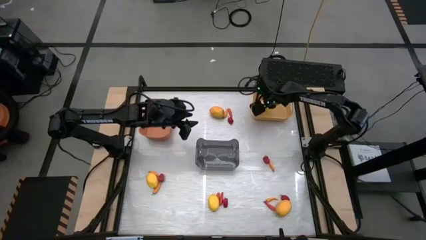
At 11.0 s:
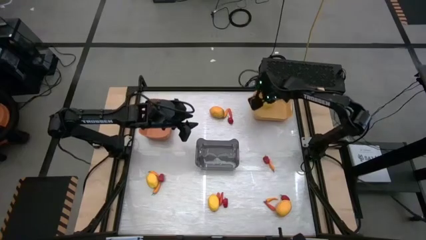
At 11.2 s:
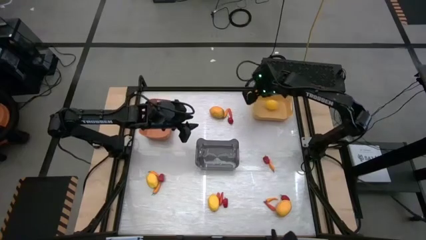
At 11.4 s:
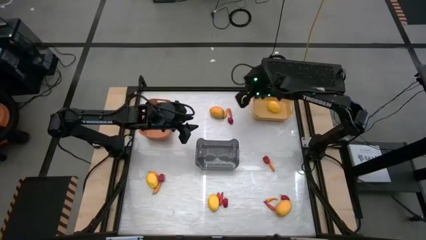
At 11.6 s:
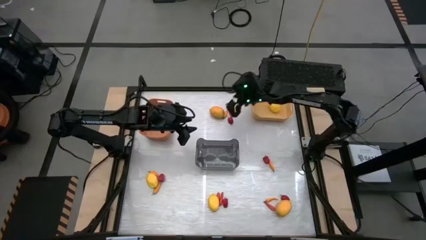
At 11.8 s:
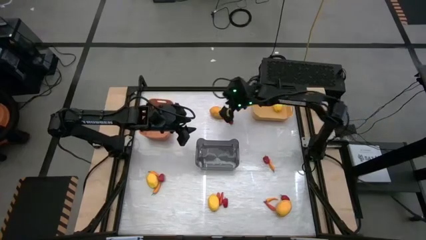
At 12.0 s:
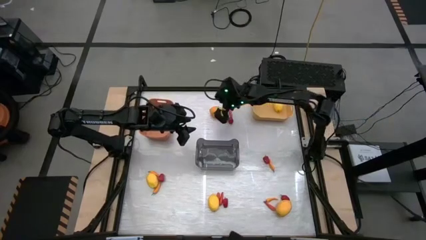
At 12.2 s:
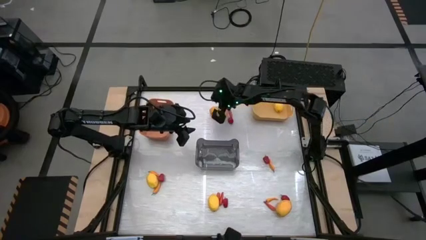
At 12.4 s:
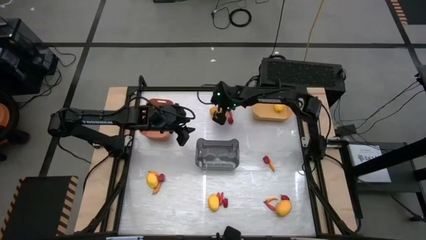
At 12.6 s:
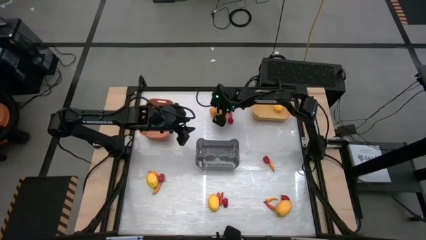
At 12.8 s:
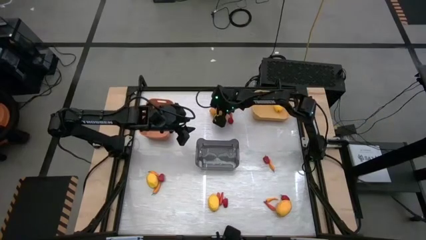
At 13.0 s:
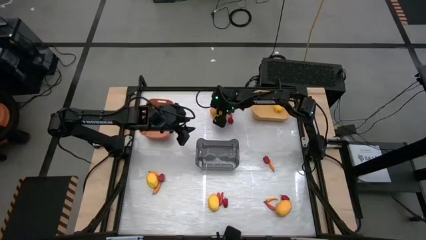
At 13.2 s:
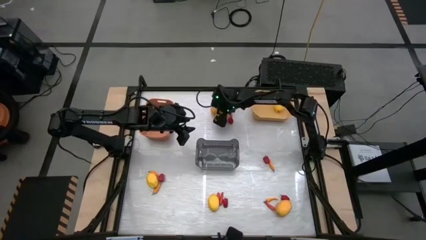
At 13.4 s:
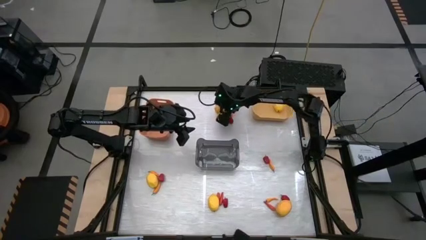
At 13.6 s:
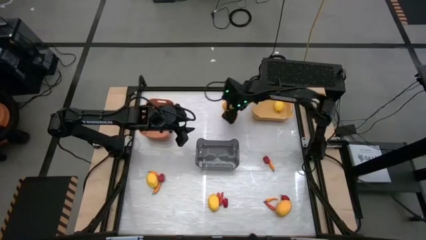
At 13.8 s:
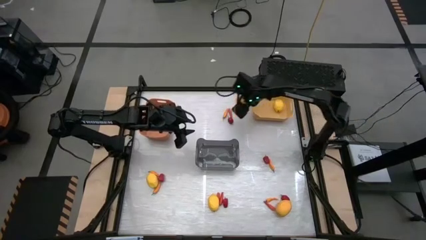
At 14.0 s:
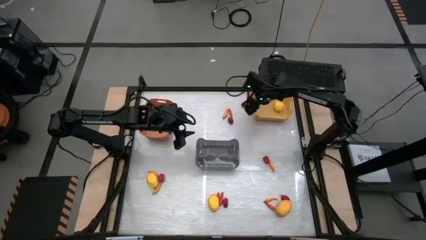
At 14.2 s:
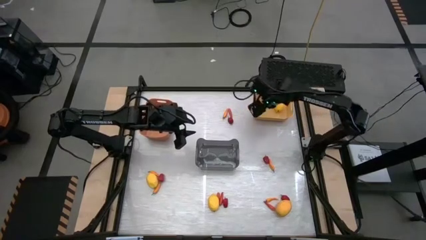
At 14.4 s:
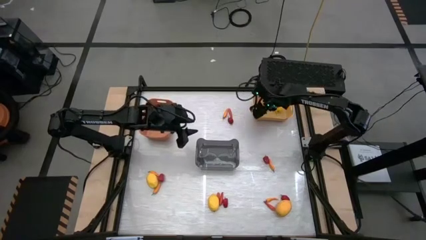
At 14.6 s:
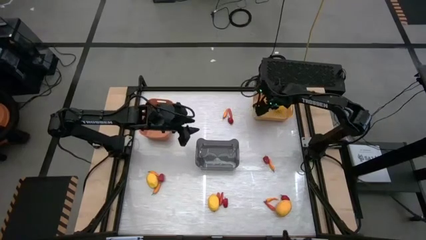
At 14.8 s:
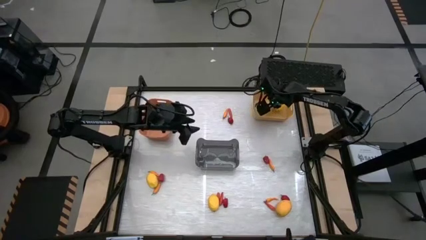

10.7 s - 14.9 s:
Task: Sort produce into baskets
Put the yellow lemon into the yellow bin

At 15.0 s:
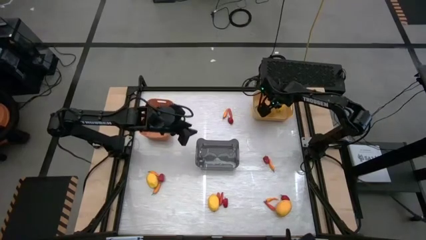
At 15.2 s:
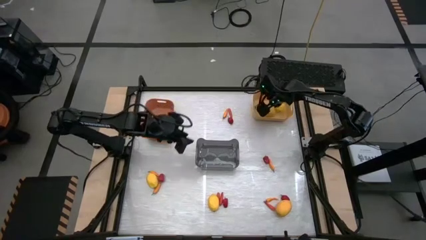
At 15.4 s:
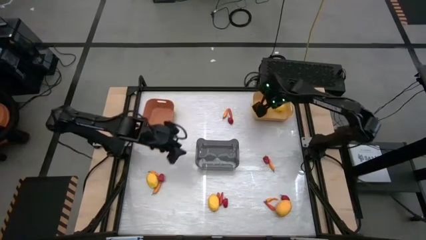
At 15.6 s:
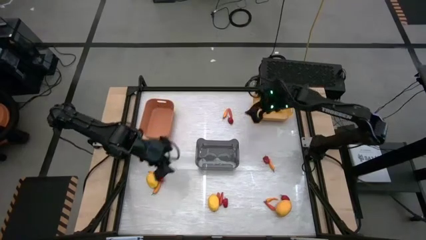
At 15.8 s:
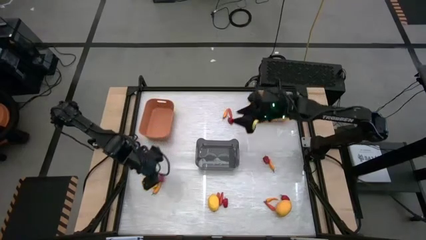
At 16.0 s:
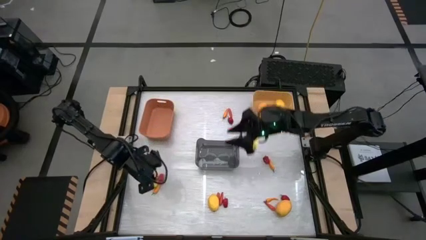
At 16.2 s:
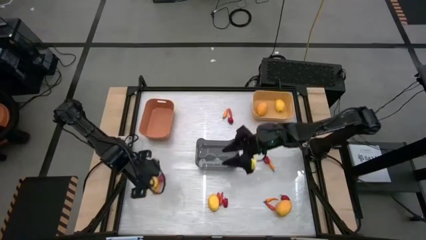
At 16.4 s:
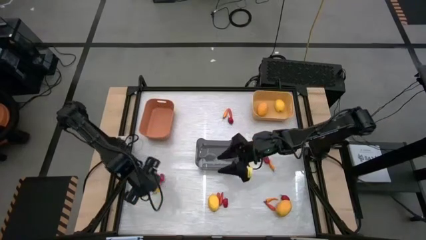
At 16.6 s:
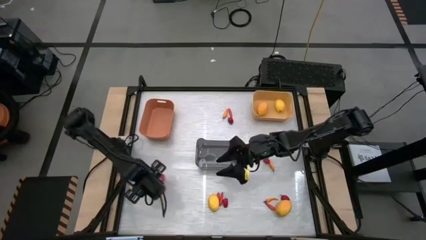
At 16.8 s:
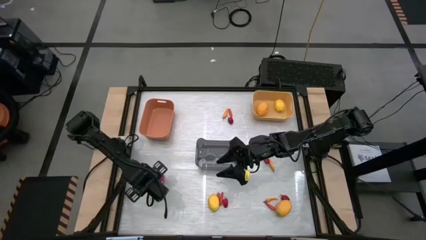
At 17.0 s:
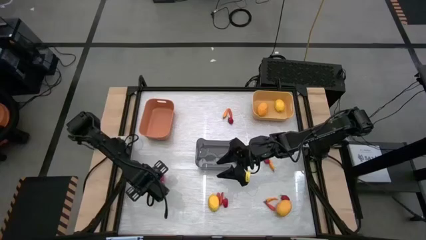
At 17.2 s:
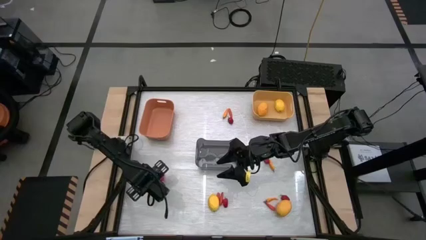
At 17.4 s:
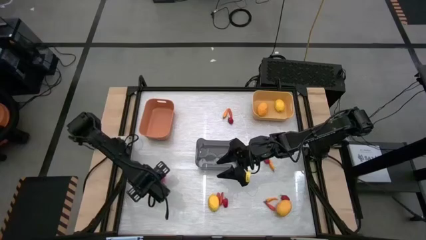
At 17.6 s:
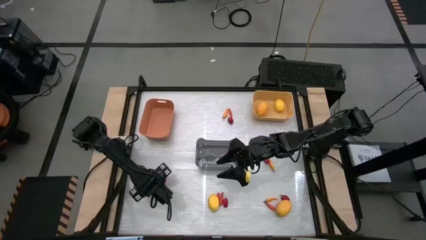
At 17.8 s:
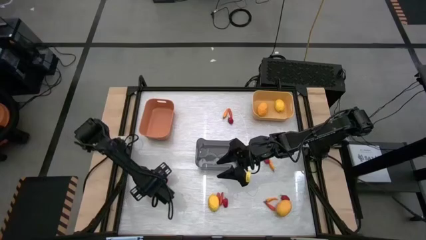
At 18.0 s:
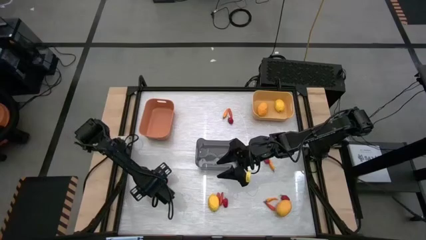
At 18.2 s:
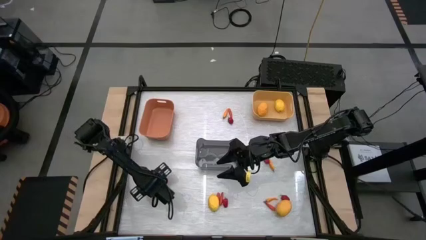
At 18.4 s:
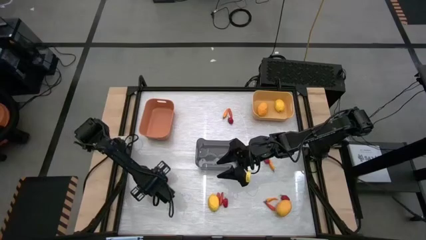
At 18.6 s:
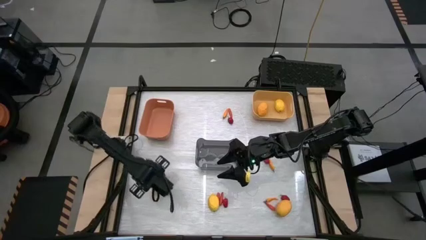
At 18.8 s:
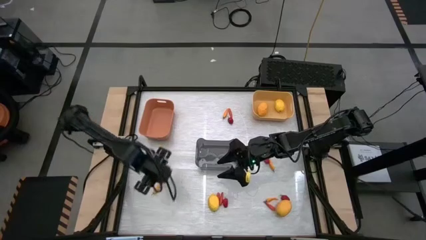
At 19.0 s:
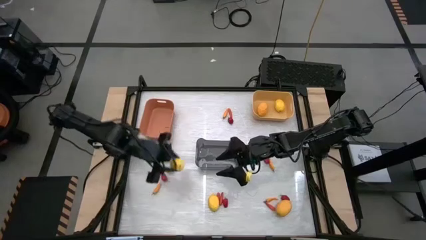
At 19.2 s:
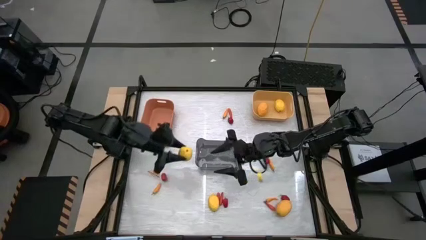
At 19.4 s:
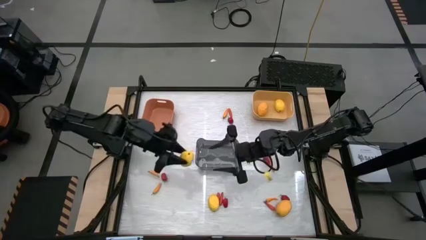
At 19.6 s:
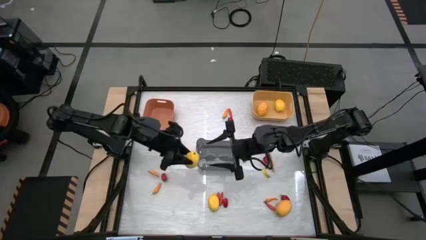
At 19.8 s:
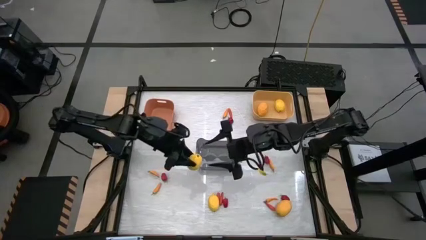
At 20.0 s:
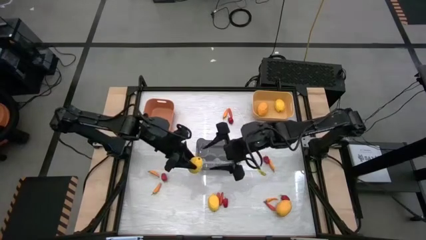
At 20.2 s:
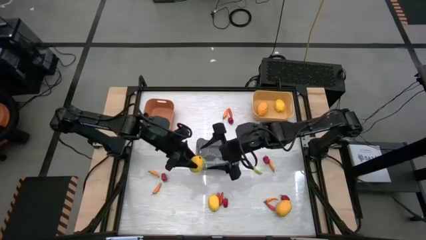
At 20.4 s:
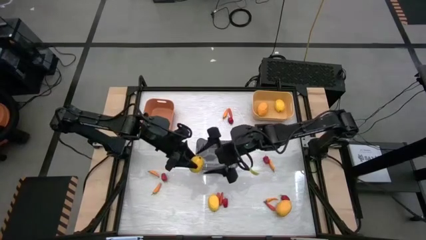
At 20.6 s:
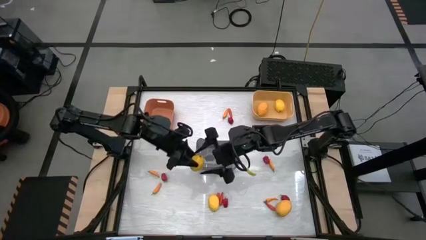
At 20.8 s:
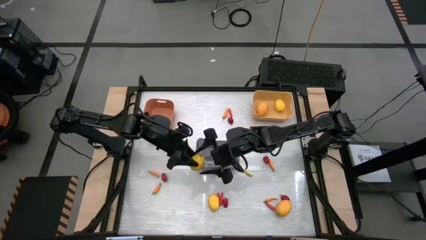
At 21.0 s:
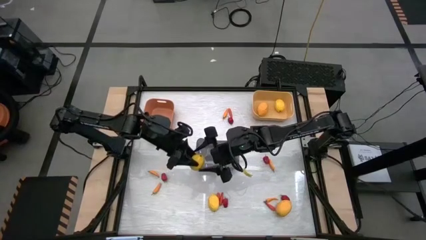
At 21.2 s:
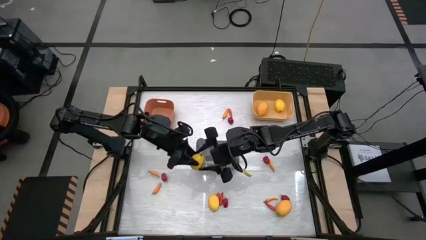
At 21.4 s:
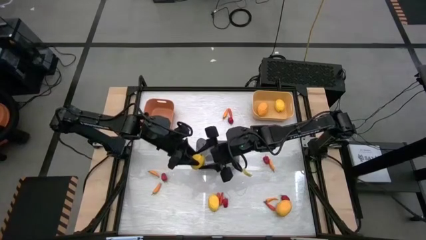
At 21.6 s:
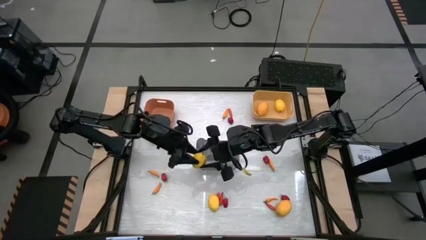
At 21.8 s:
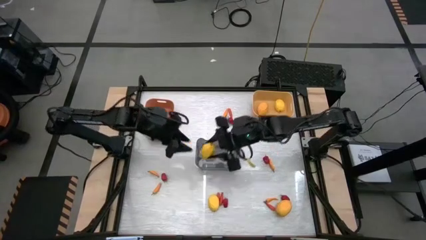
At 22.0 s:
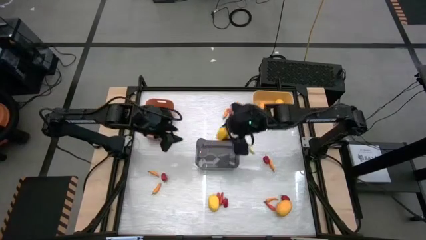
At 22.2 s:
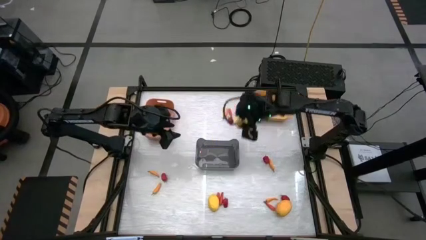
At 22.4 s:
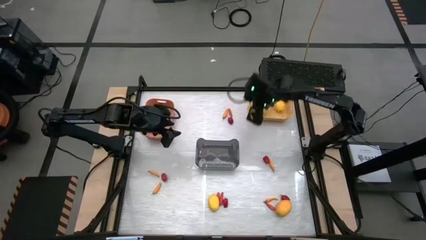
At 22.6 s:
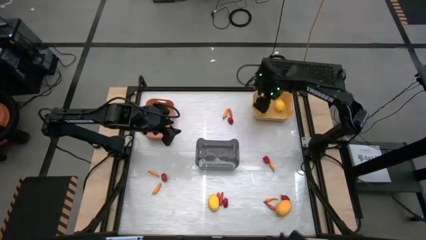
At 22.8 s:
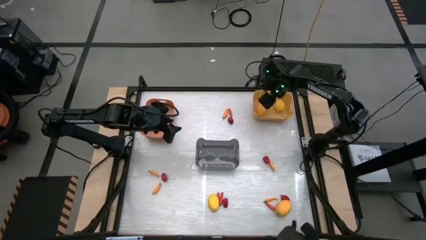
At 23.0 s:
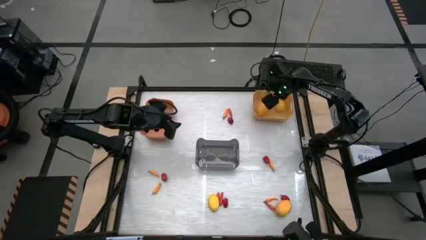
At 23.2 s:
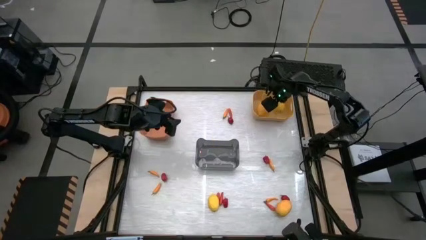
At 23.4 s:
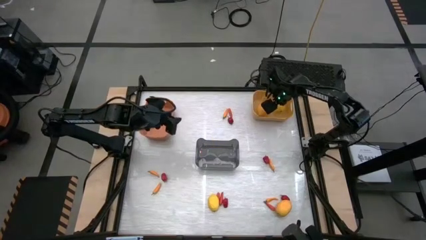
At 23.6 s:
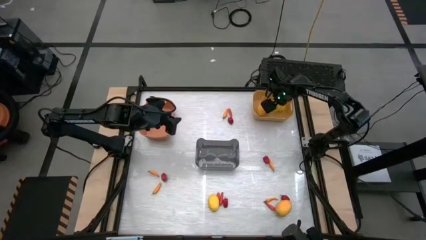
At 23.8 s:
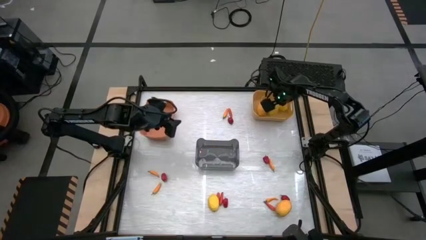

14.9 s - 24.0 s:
Put the yellow lemon into the yellow bin
